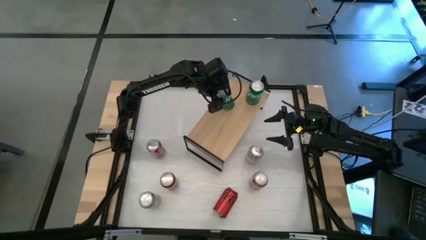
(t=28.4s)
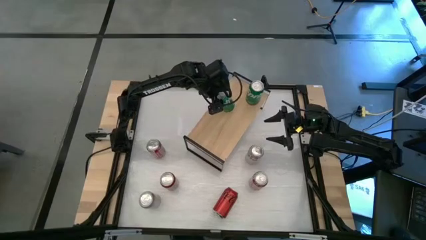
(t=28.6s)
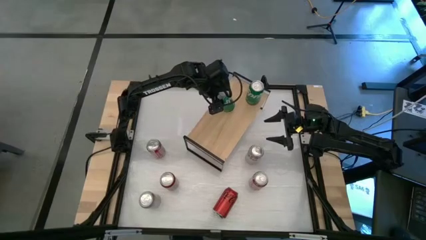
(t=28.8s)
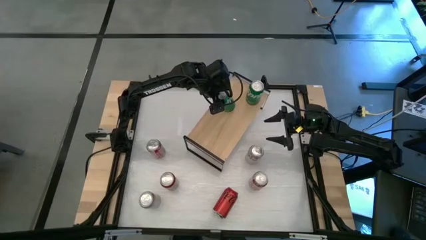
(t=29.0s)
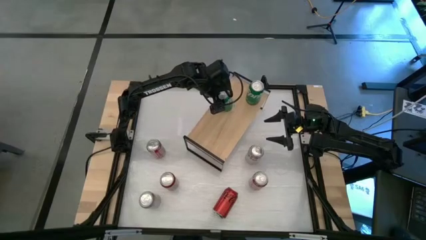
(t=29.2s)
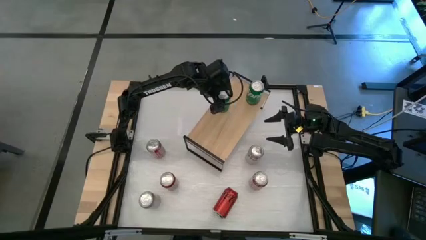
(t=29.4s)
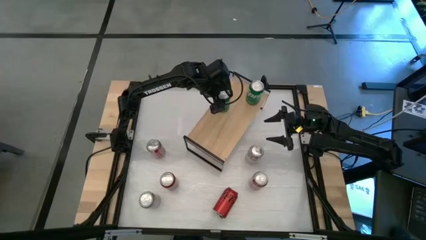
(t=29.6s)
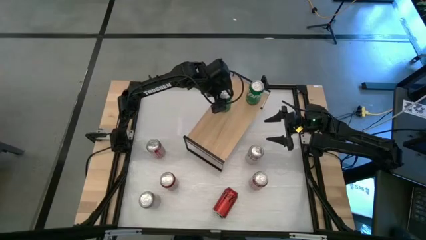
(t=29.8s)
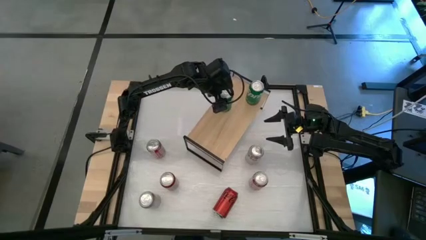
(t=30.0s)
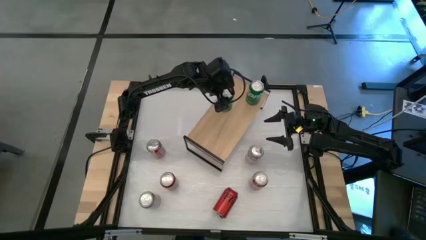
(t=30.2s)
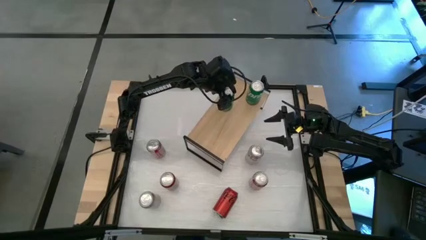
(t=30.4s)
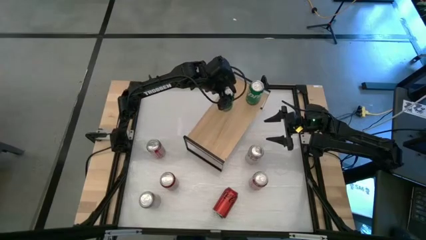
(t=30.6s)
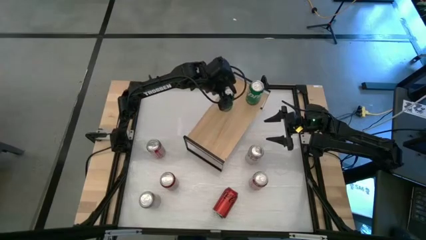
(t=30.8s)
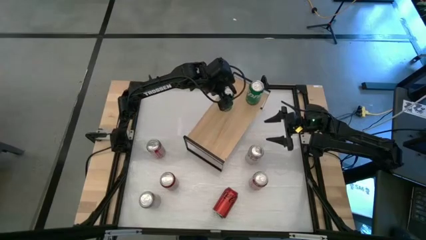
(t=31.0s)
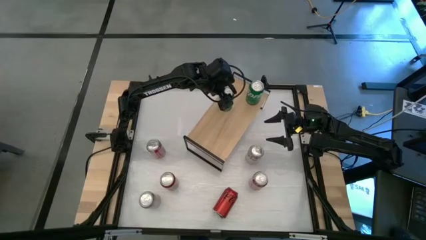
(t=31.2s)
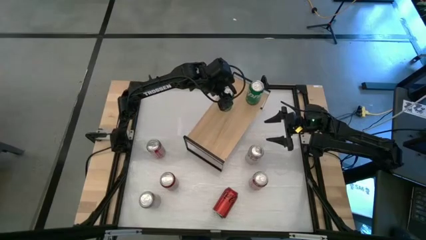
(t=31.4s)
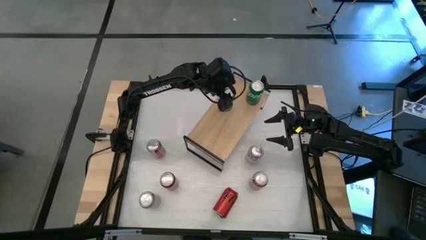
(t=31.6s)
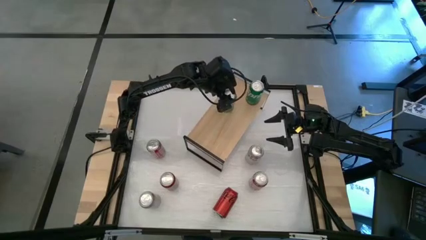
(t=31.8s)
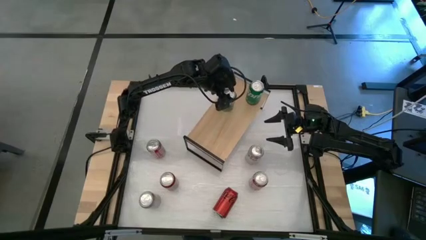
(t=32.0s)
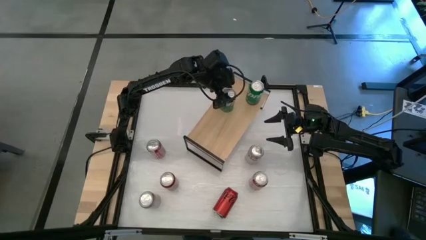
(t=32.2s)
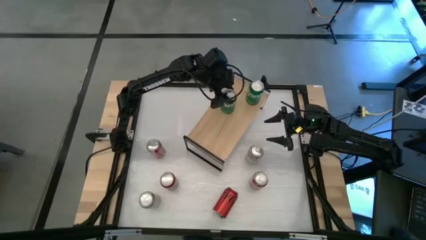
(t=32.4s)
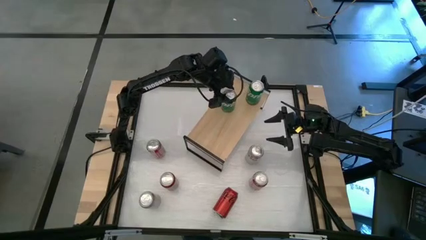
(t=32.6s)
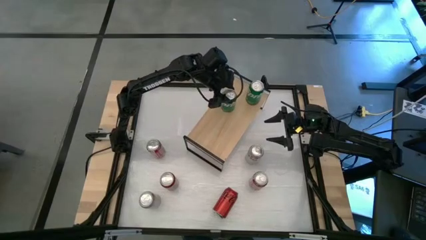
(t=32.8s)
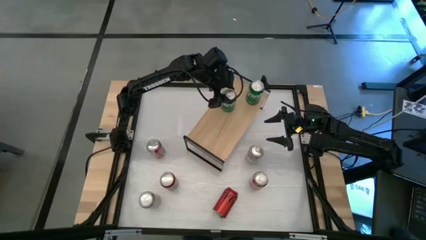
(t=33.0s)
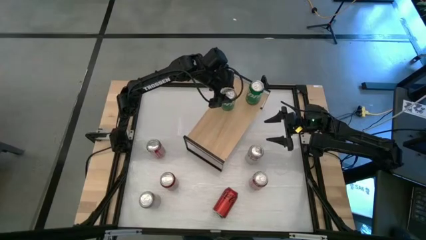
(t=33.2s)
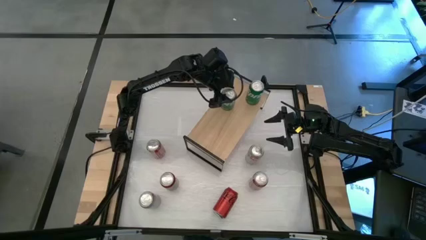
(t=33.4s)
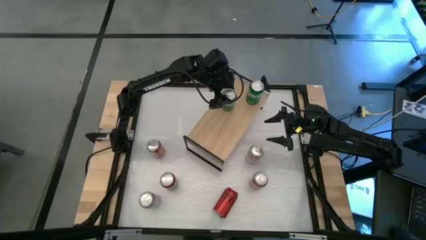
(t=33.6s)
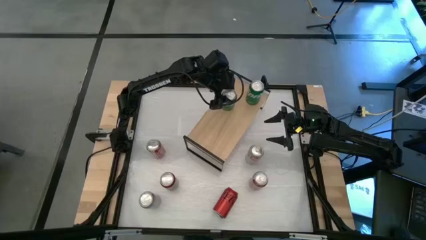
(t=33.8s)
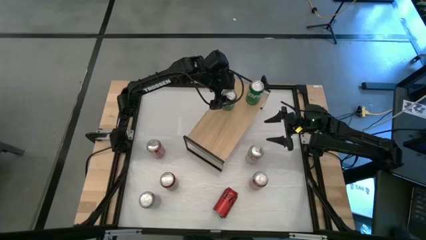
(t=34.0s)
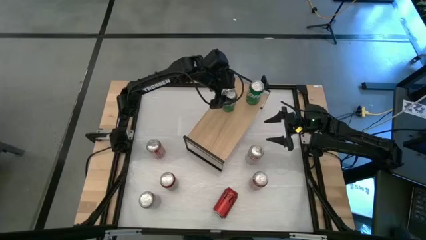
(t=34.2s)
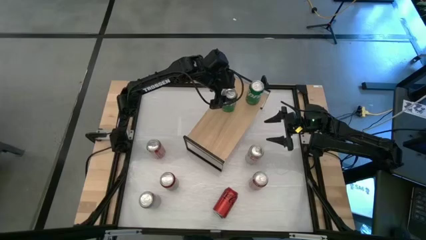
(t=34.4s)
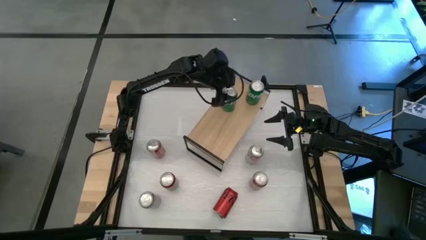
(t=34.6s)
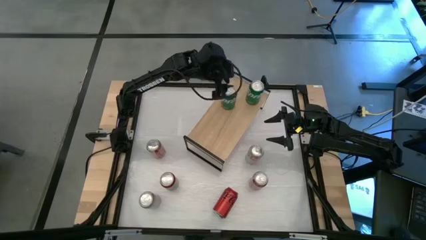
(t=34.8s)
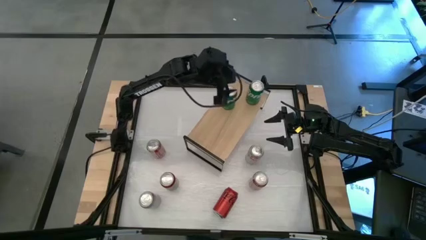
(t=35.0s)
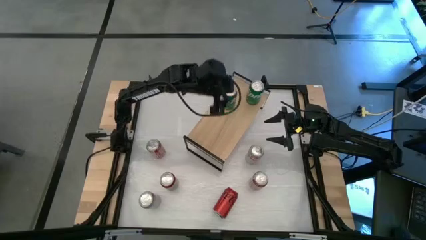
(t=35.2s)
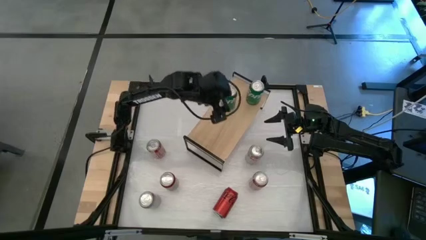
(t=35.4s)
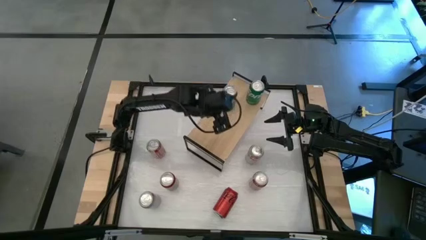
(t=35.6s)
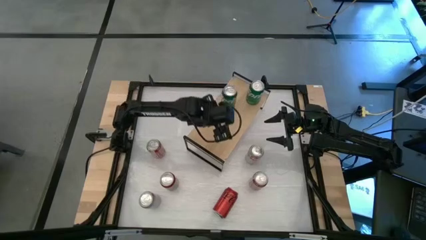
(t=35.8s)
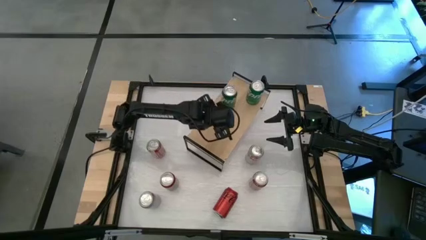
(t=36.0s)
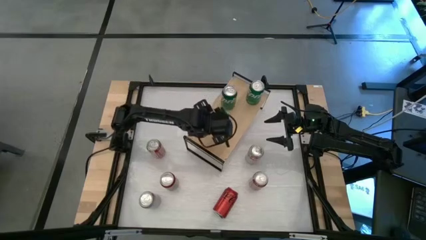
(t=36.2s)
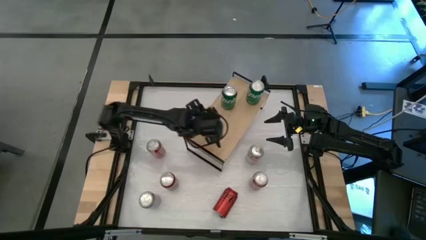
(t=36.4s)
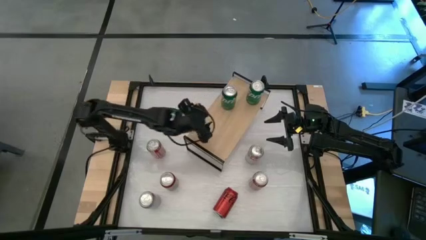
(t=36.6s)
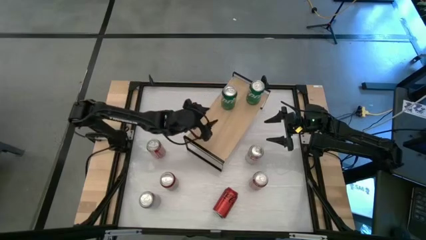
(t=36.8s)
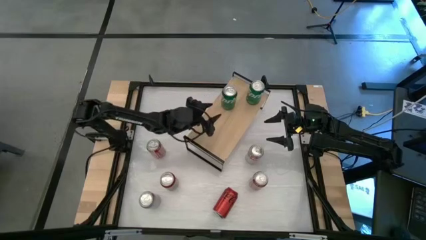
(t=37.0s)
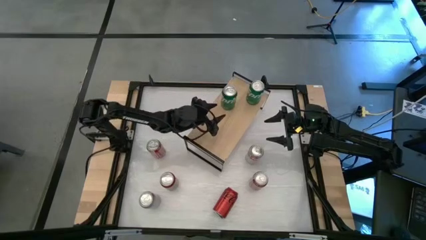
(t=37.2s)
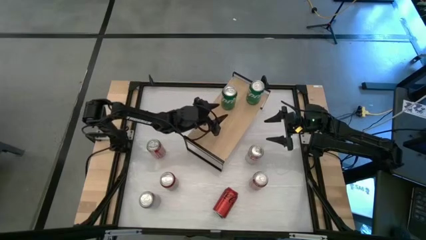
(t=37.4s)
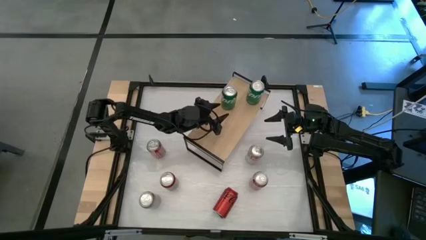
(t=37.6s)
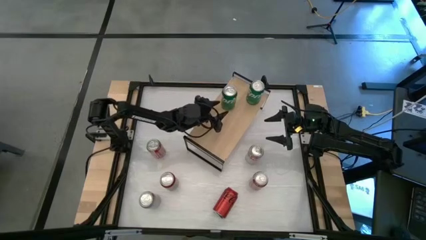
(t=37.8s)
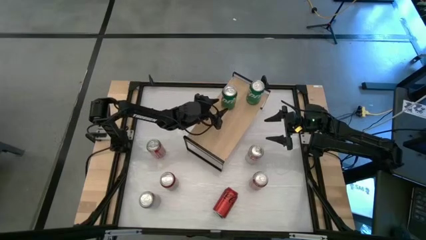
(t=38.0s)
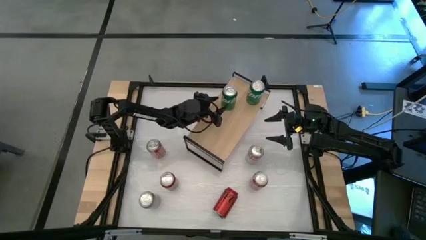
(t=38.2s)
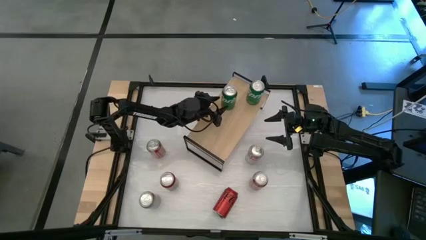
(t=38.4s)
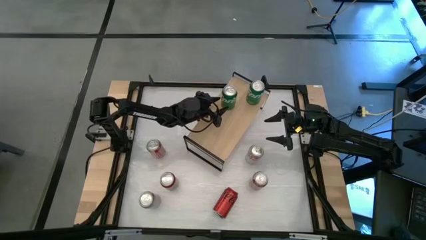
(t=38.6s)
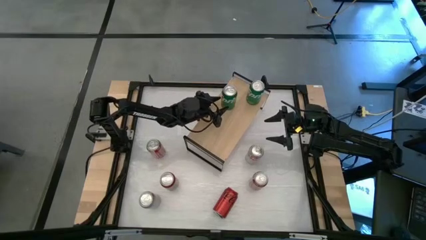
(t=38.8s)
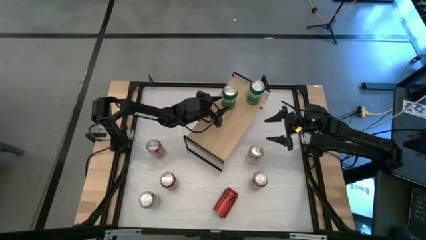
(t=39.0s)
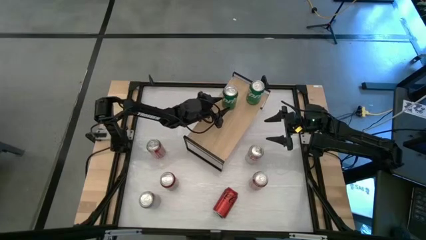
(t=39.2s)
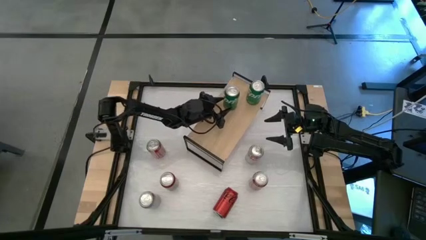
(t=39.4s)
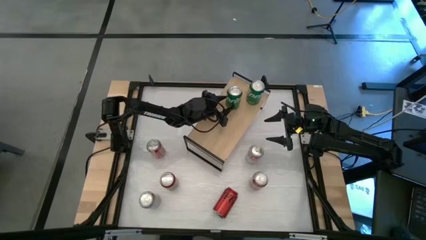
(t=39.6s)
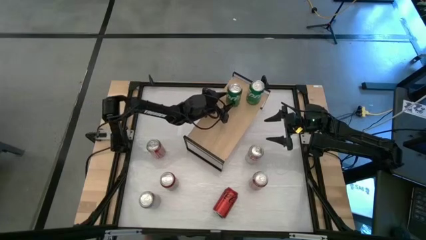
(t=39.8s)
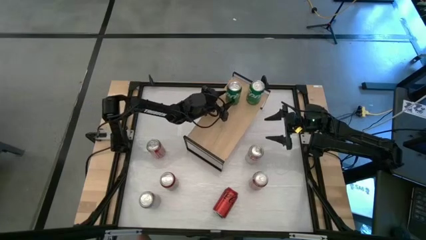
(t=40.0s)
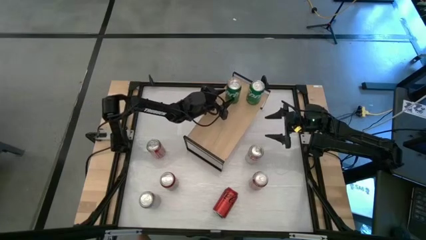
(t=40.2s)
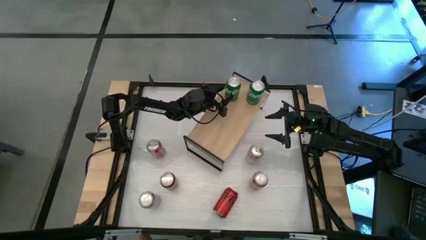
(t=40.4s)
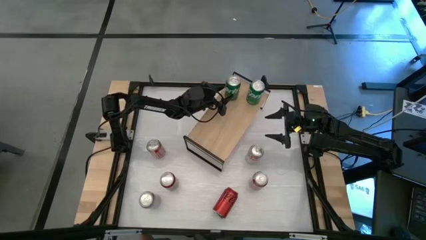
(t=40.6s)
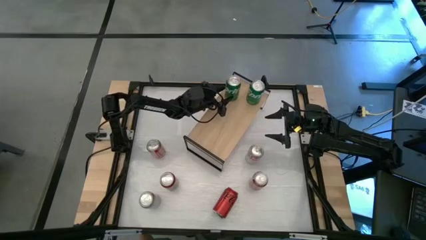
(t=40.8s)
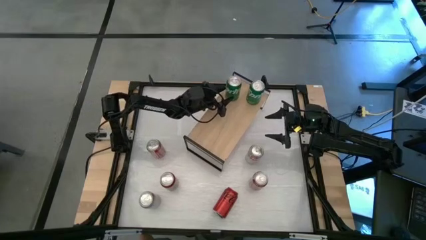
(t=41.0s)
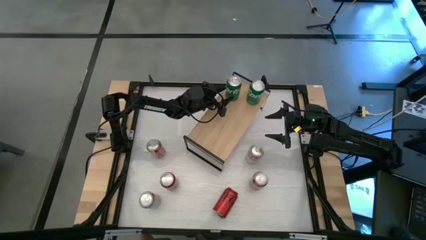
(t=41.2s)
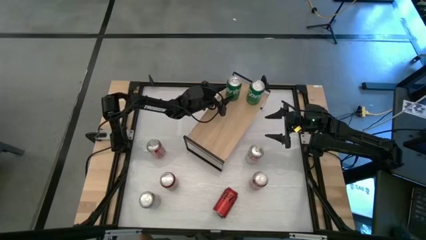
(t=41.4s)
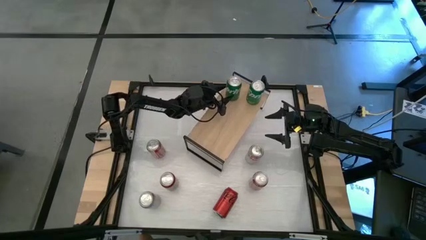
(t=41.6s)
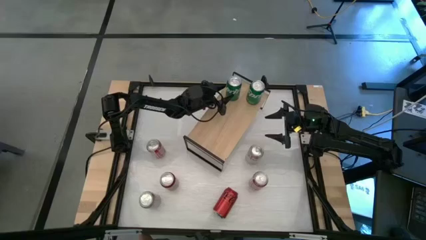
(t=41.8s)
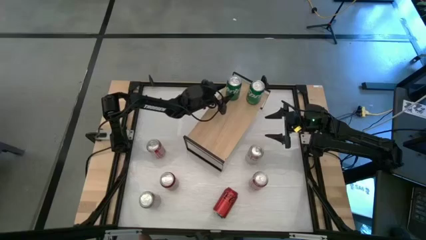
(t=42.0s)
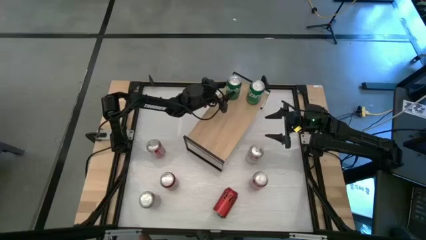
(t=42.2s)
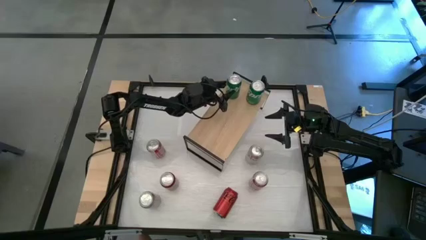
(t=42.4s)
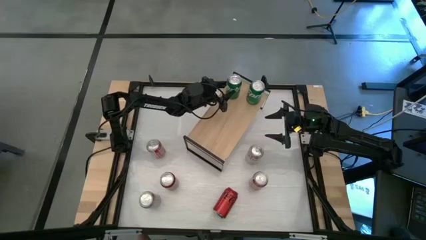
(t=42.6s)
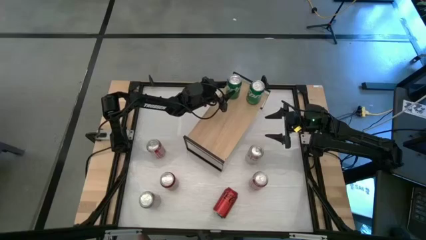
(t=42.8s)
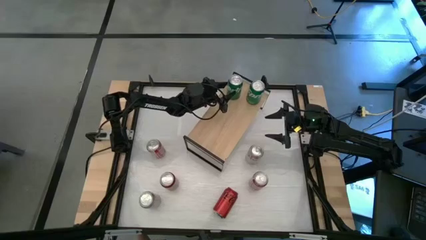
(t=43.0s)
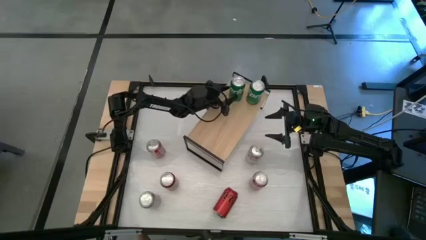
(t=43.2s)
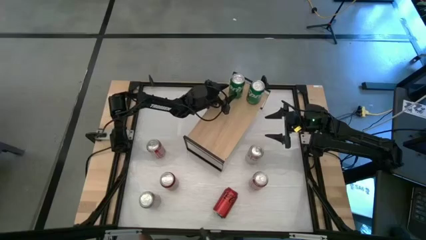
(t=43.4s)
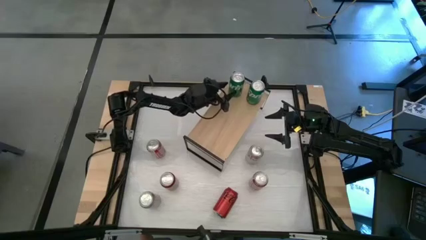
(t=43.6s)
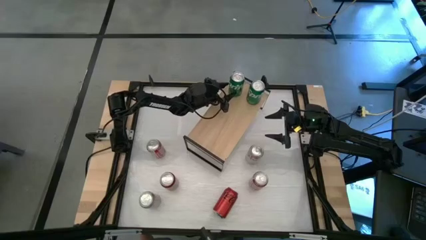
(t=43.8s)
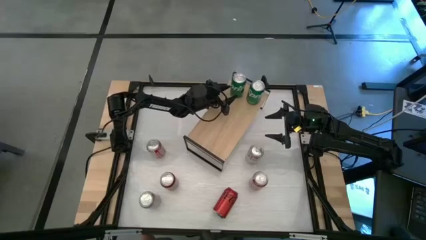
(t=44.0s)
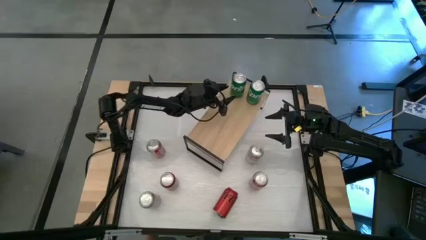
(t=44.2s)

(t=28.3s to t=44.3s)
Task: Place canned beverage on shelf
Put the green soda can on the shelf aligned with the other green soda can
